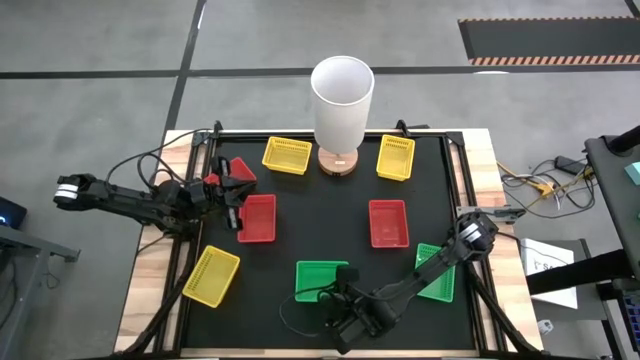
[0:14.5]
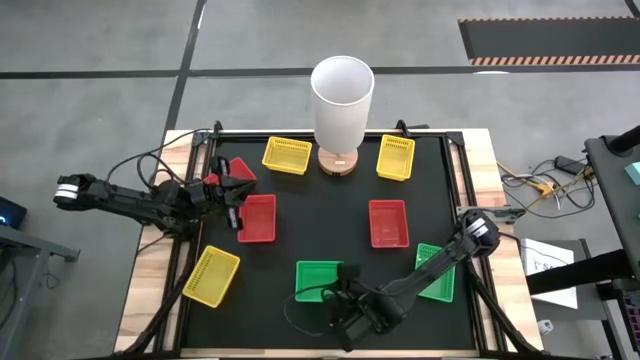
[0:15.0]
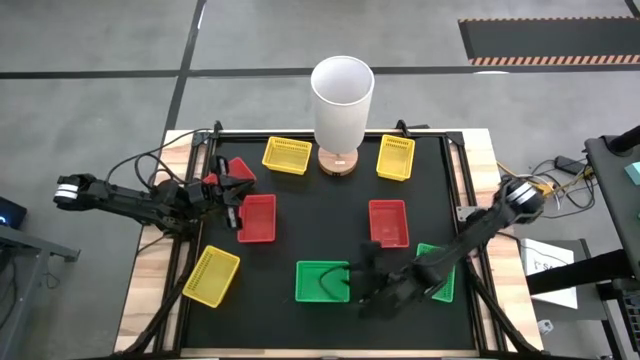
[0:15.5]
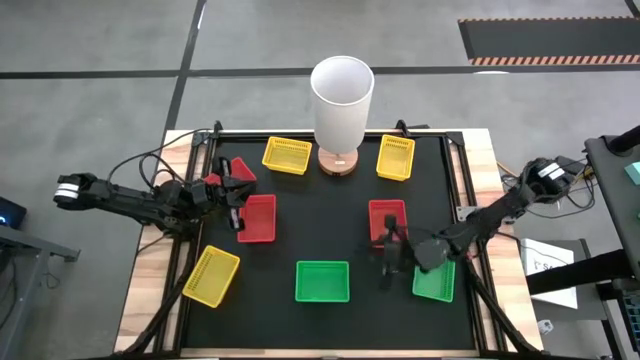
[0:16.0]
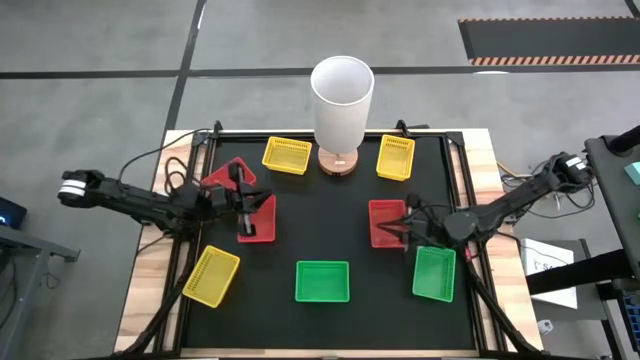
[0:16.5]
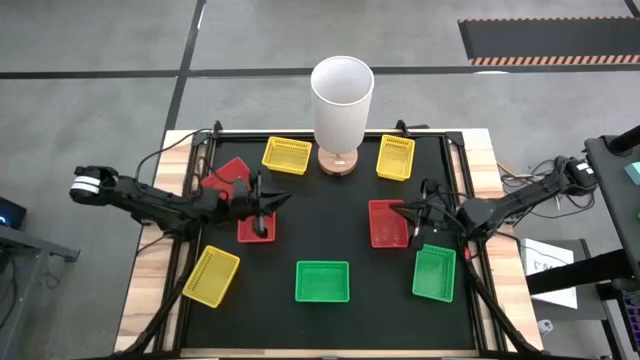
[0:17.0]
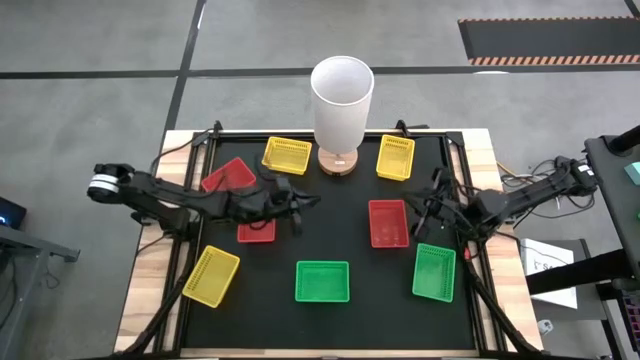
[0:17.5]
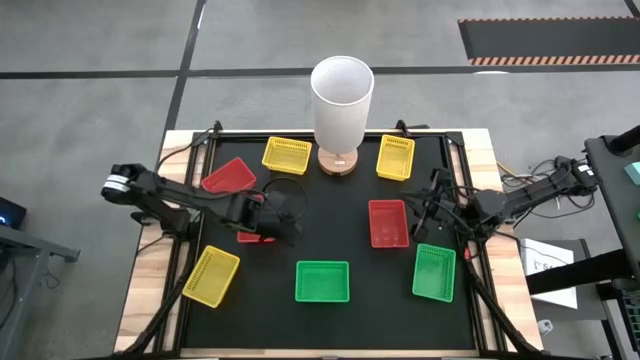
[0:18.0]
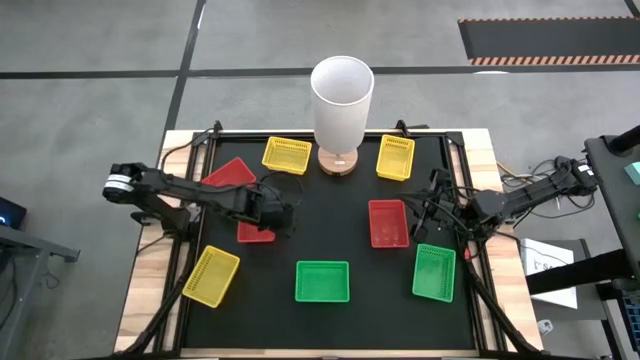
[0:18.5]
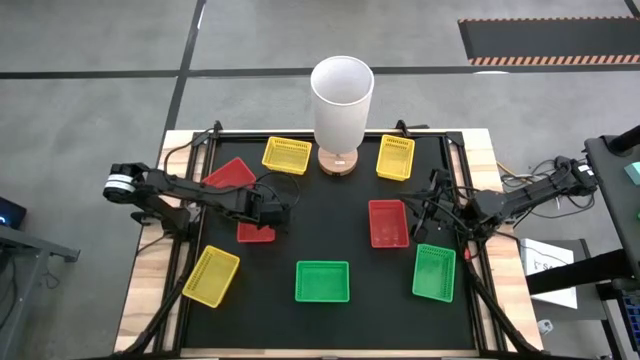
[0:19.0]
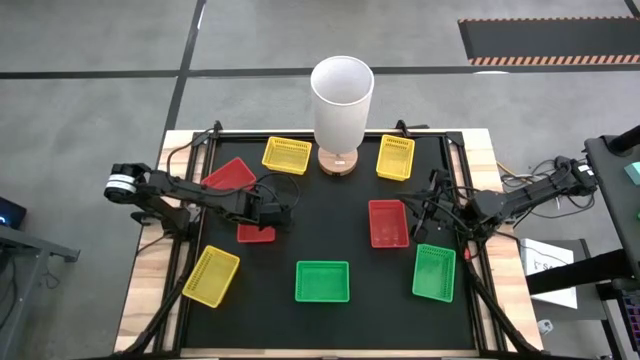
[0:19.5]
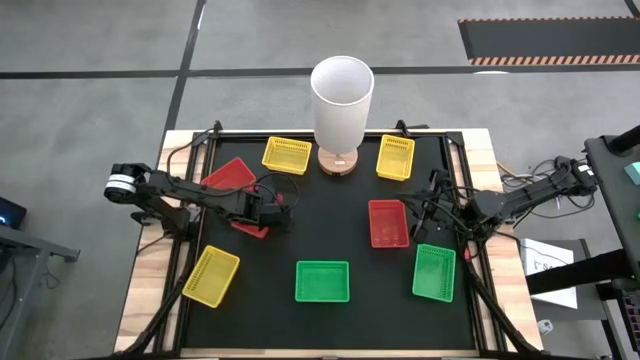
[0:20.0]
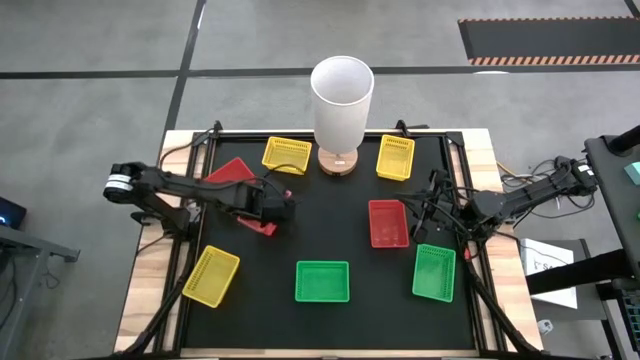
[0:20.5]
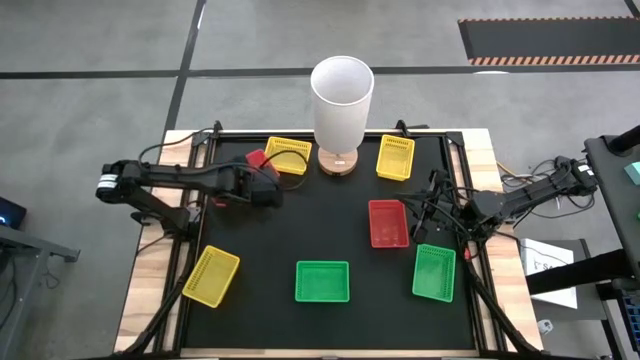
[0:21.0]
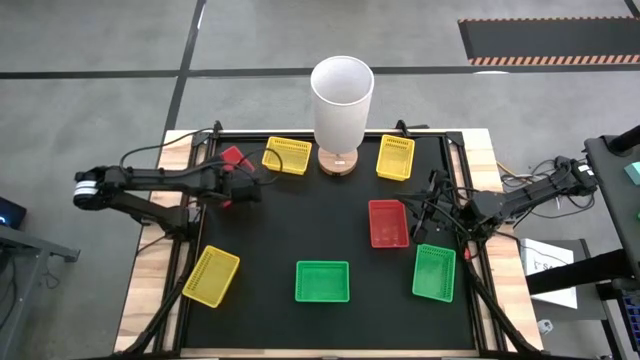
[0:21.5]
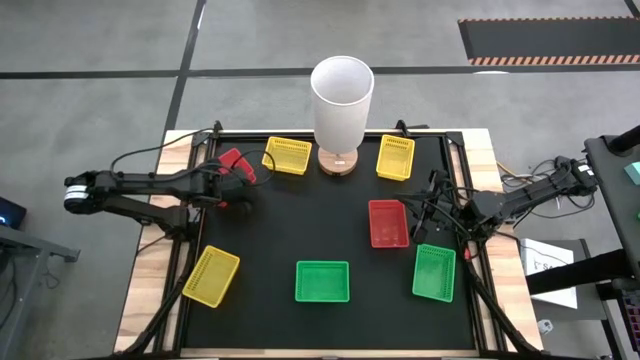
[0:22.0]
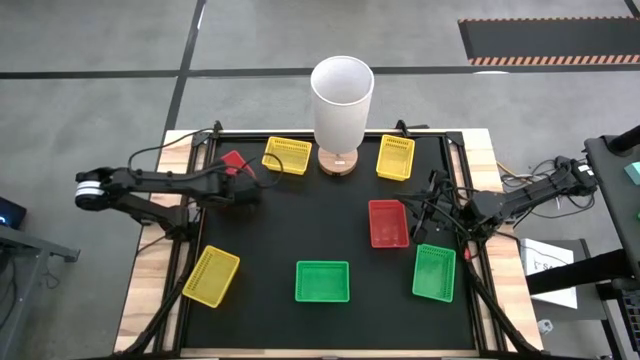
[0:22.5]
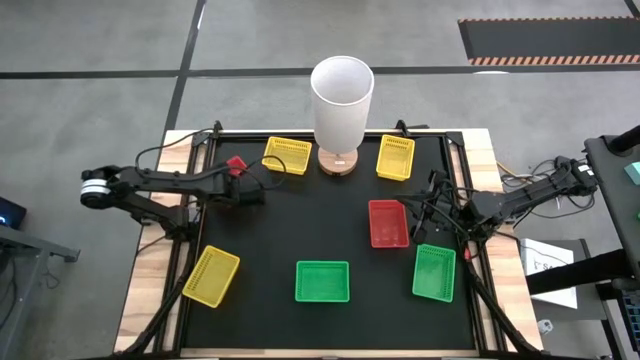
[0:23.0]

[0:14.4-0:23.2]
Stack the bottom left red bin on the top red bin

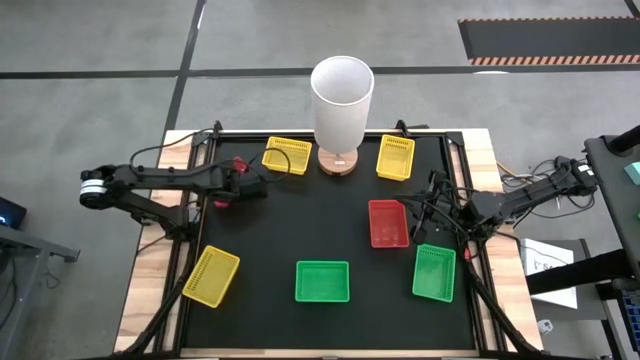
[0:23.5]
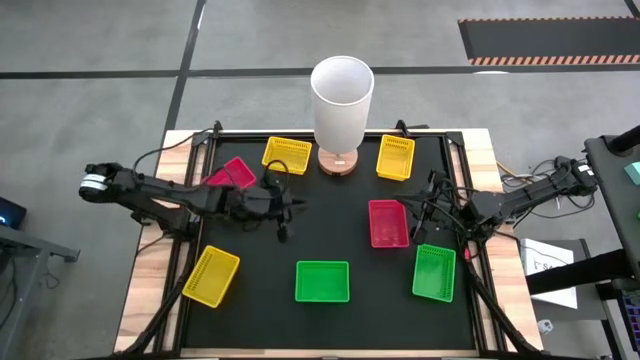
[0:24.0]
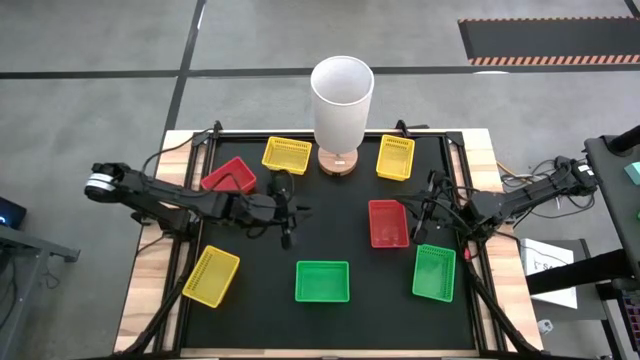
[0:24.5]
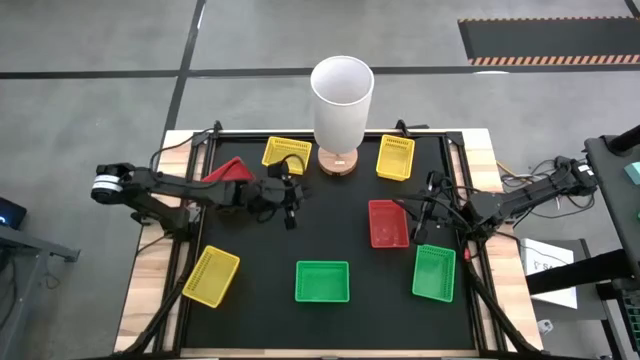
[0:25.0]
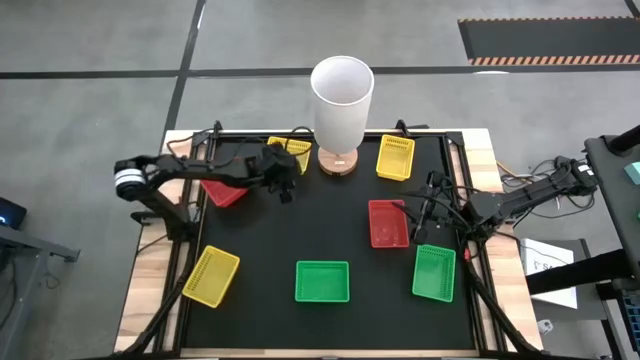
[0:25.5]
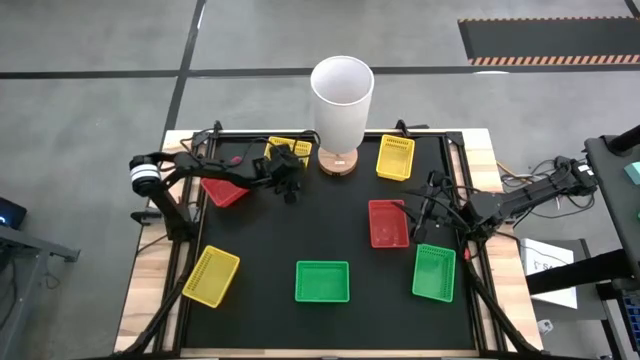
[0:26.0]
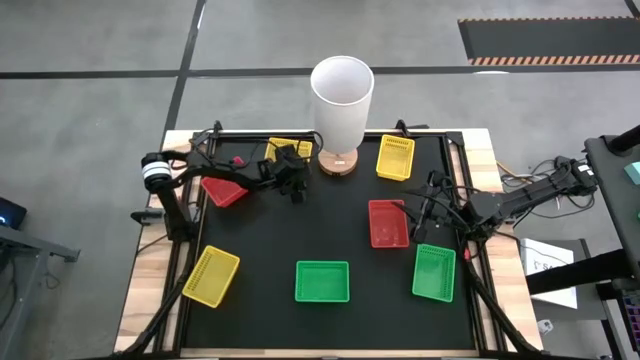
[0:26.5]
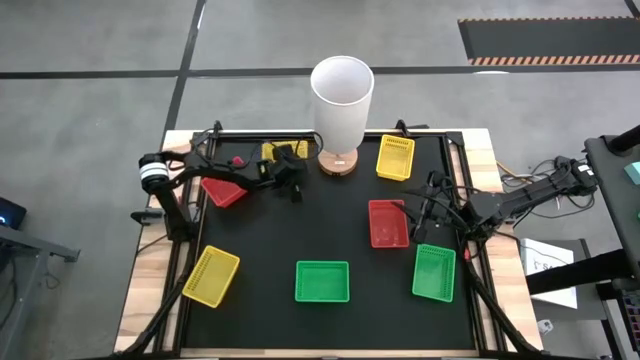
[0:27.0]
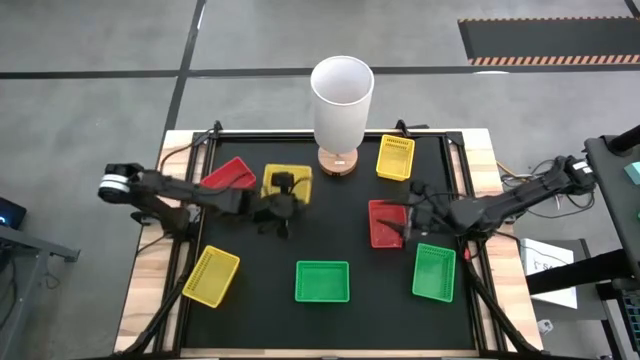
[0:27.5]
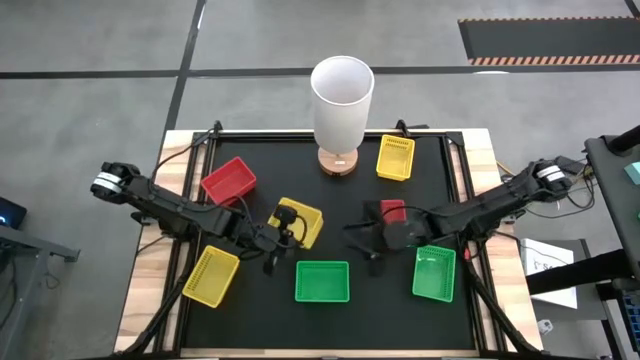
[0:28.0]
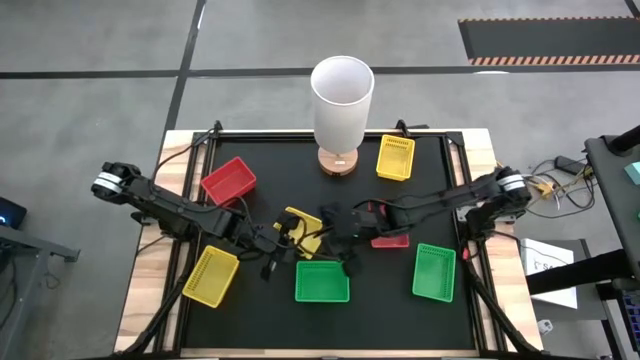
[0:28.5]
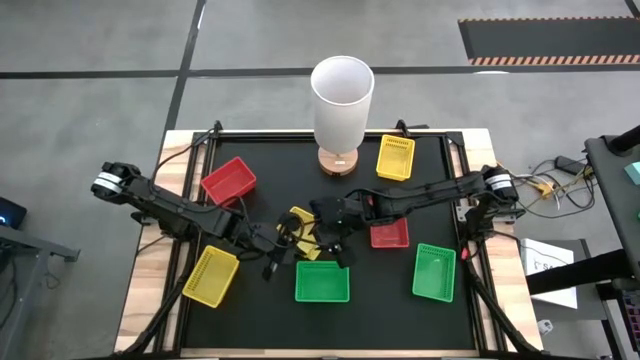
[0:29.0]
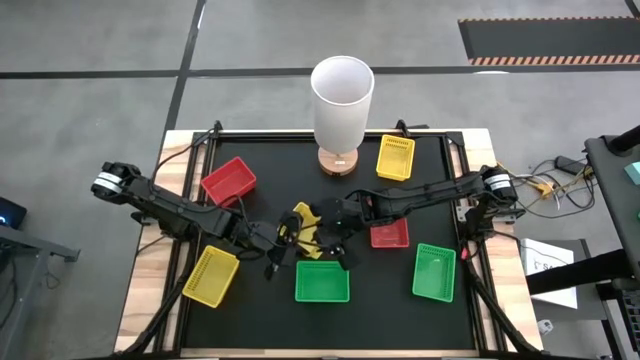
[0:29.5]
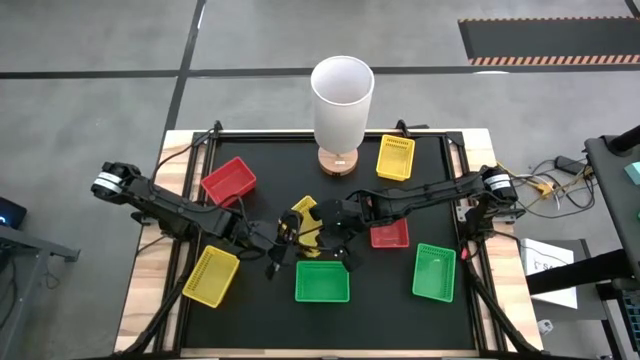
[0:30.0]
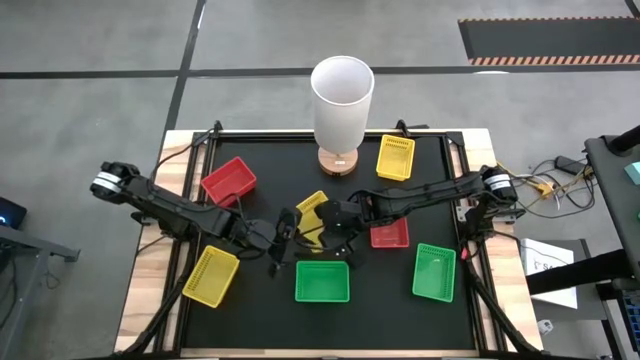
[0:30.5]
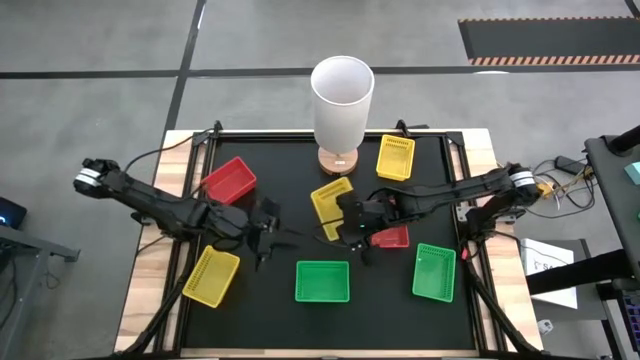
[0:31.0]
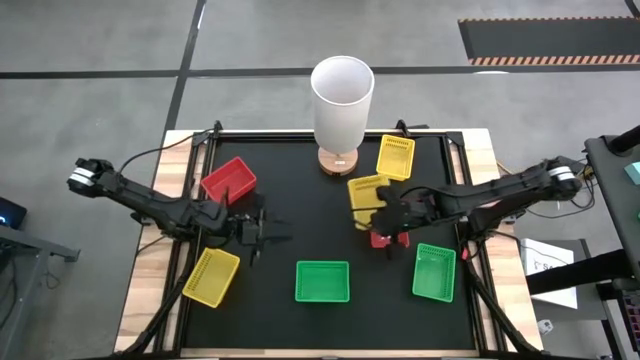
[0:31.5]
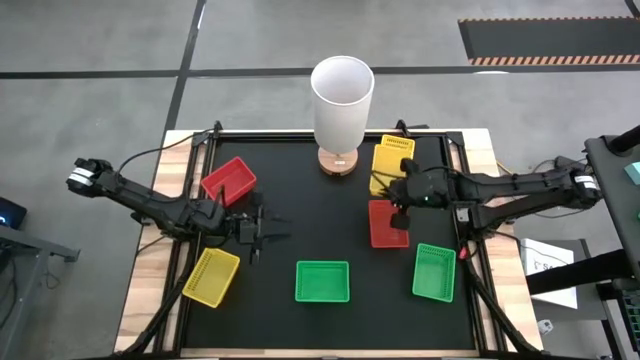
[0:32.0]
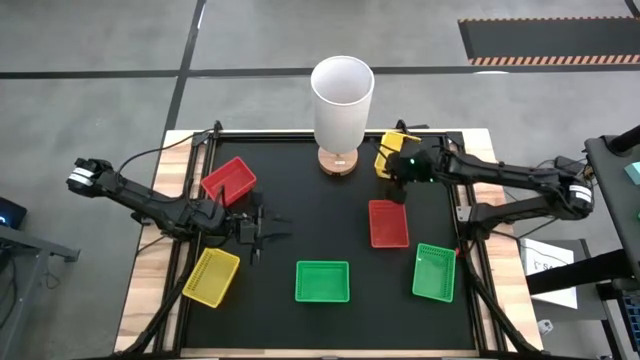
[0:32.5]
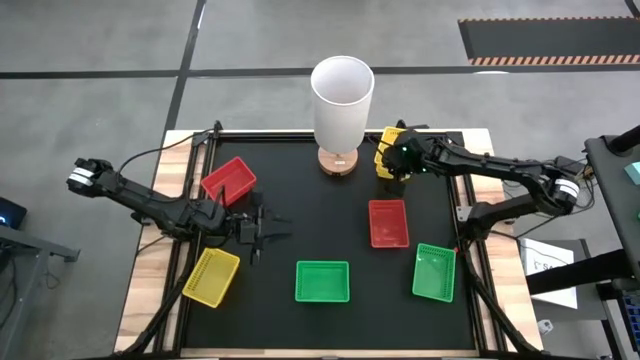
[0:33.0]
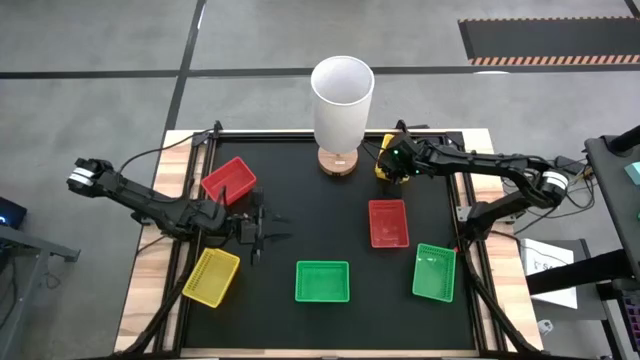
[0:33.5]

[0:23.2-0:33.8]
Stack the top left yellow bin on the top right yellow bin
